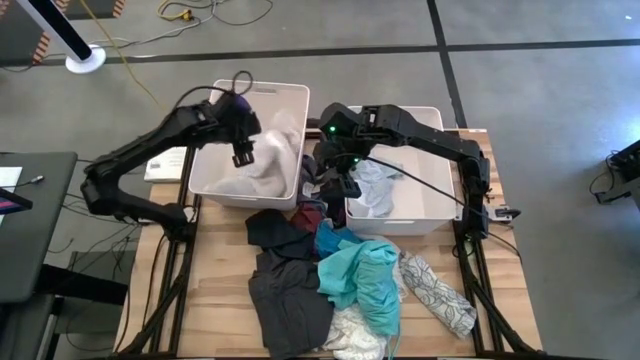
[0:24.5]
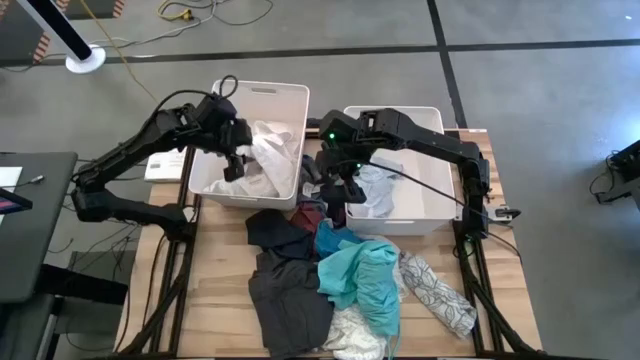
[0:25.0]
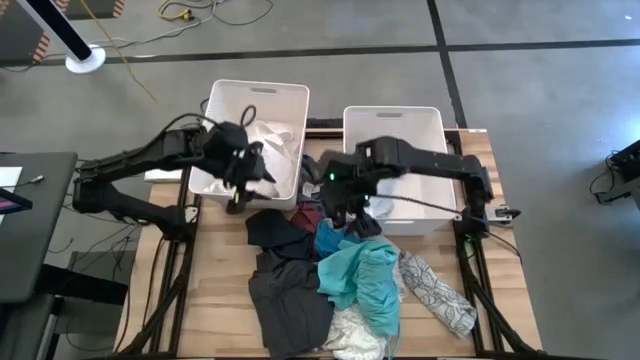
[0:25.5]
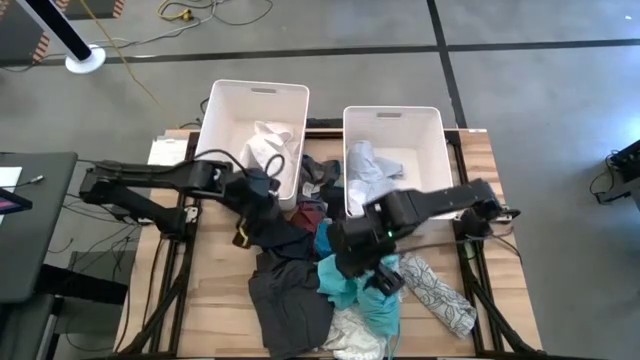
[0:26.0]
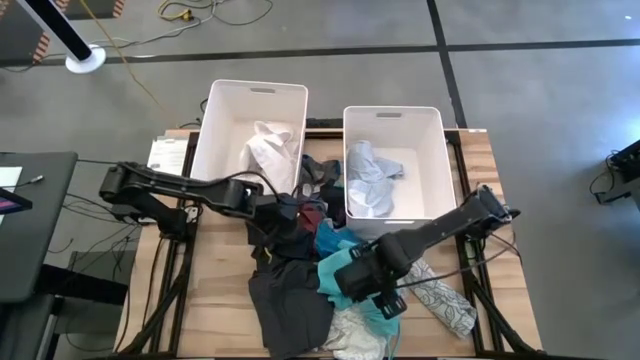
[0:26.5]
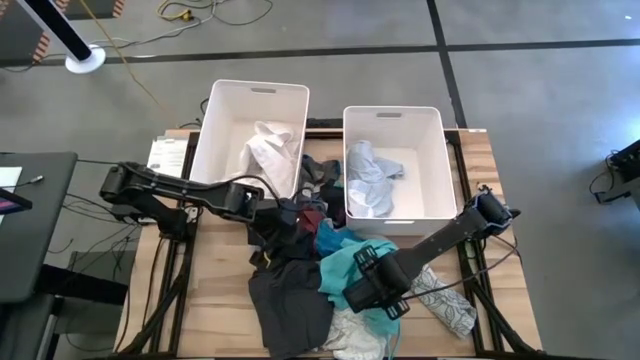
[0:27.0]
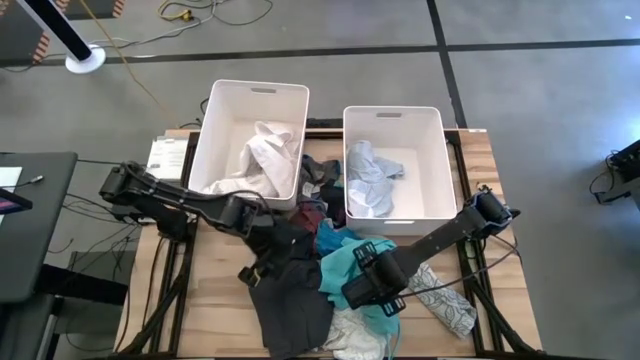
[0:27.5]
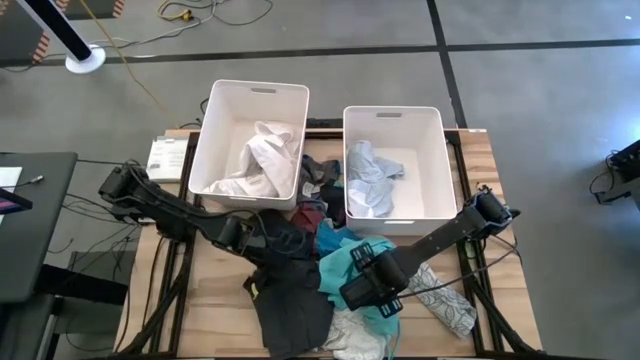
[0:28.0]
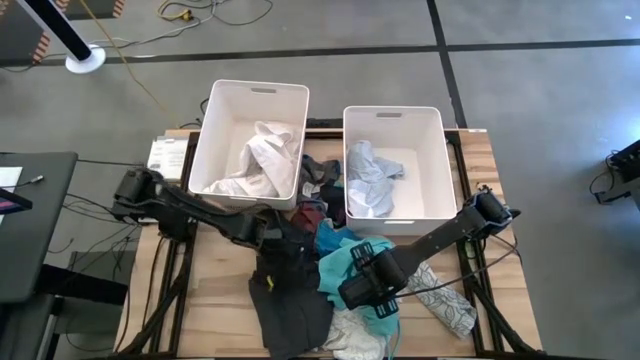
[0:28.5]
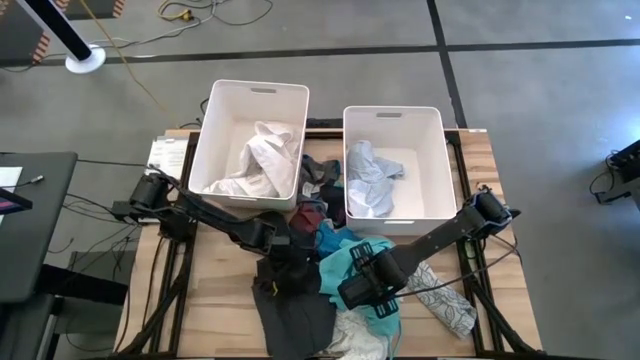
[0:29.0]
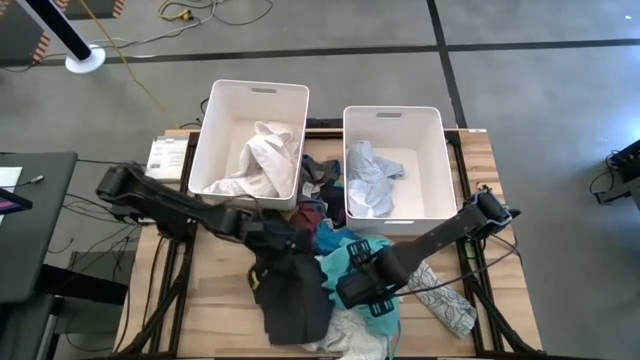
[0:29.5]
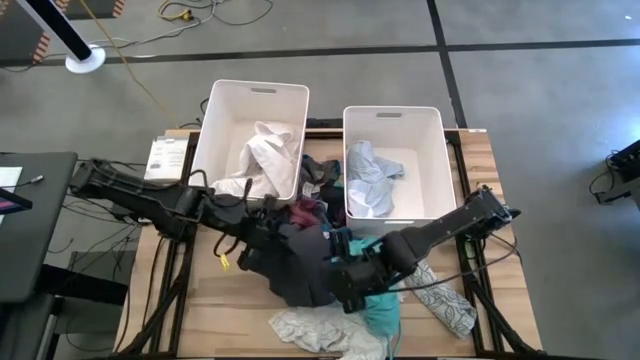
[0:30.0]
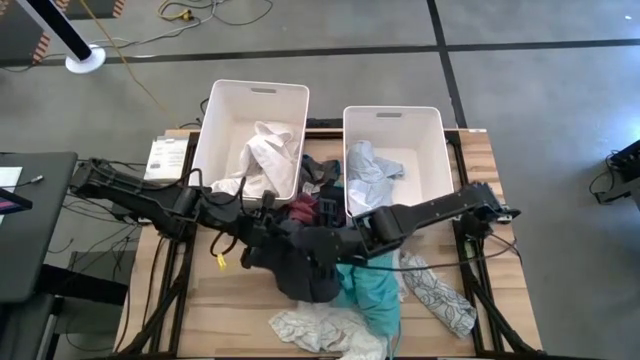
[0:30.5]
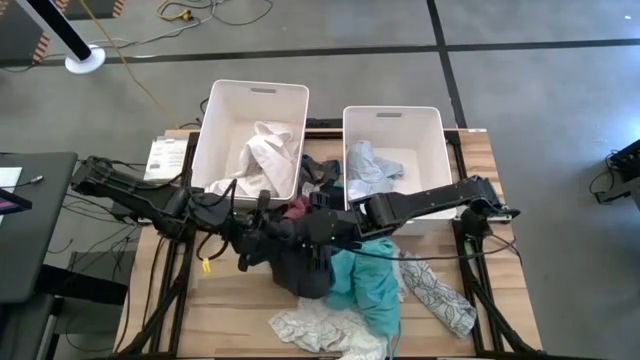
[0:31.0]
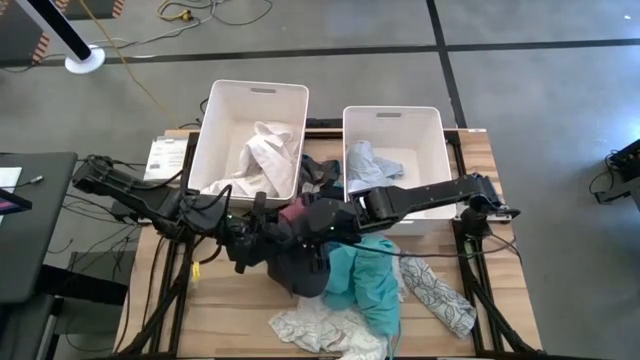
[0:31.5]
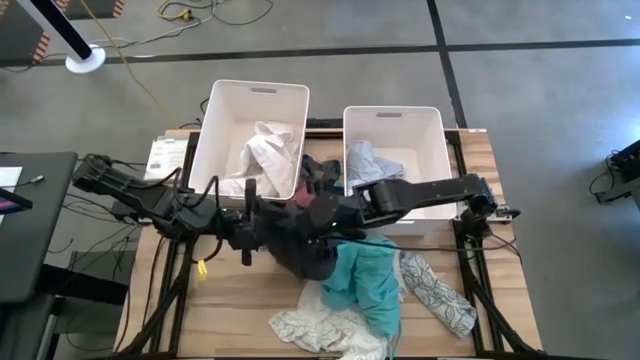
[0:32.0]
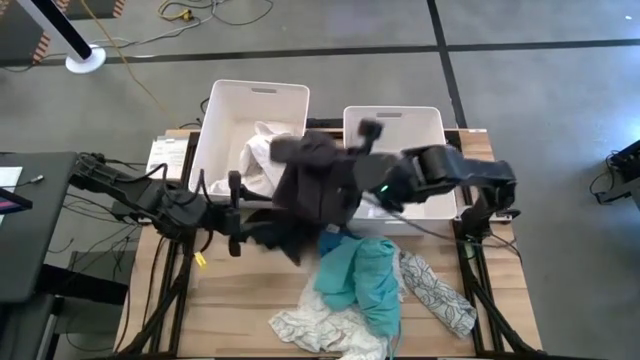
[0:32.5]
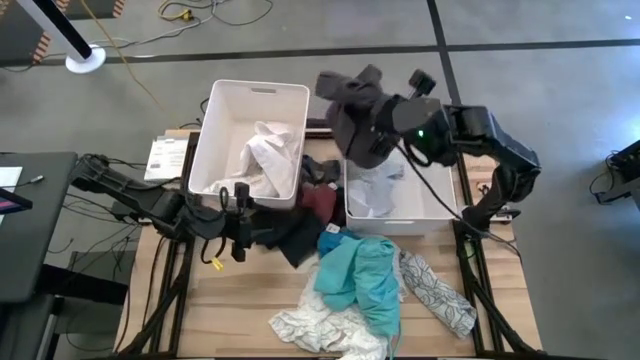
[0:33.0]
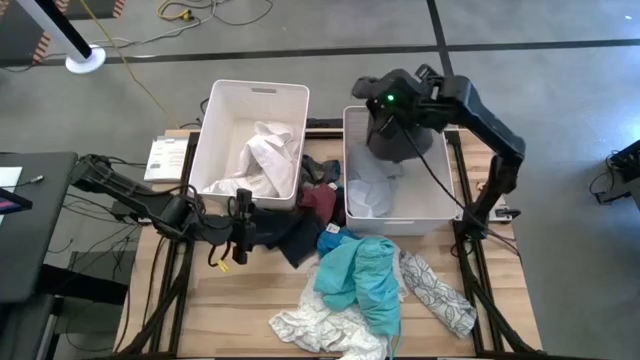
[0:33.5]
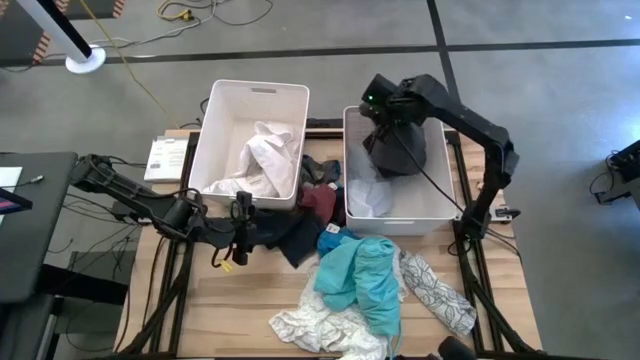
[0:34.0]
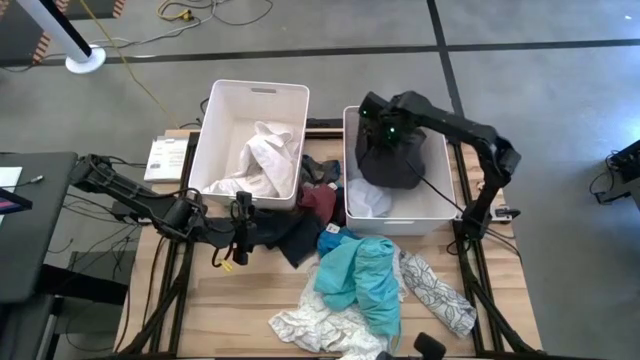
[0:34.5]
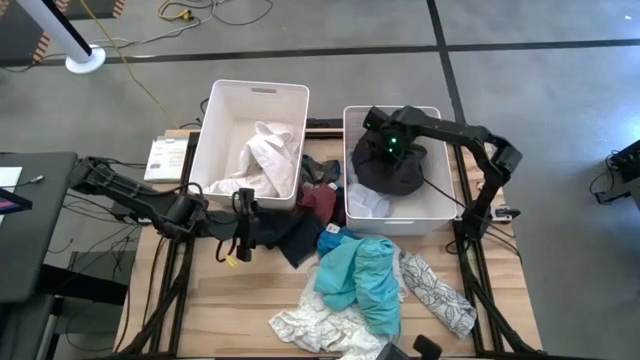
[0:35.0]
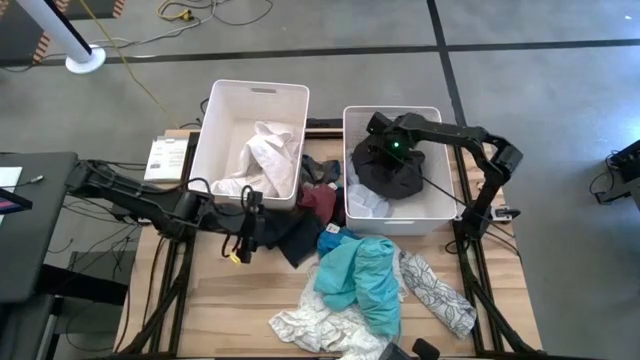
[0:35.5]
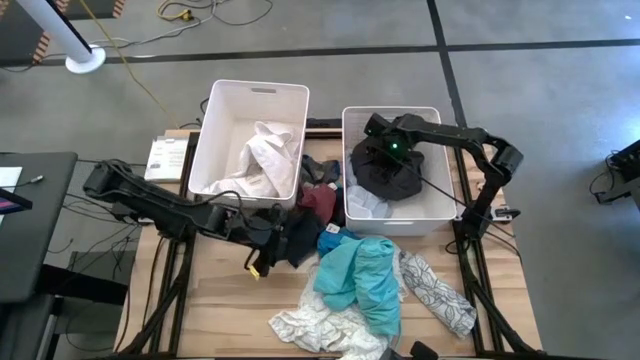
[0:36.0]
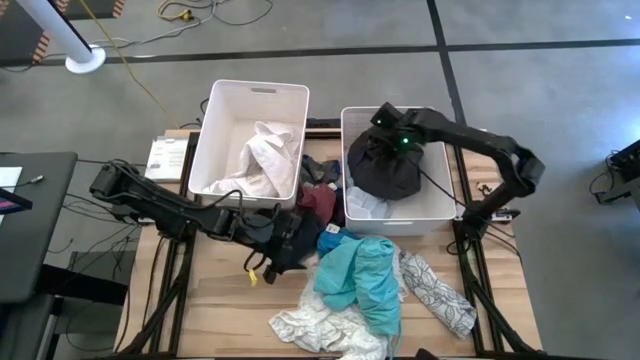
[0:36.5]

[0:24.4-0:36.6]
Task: Sort clothes
Put the black pants into the right white laundry bin

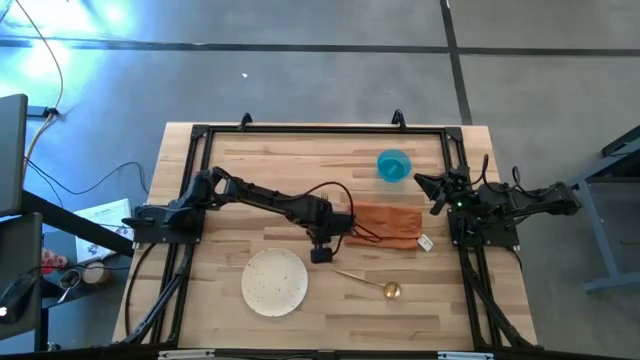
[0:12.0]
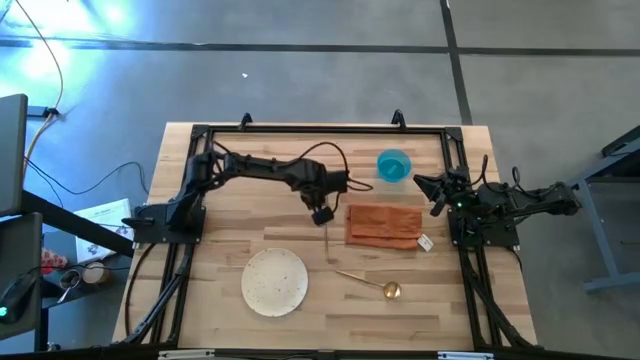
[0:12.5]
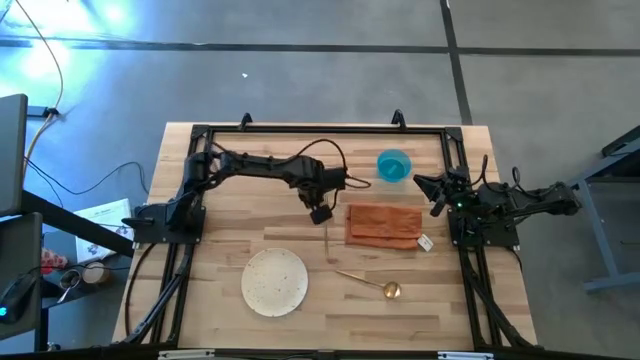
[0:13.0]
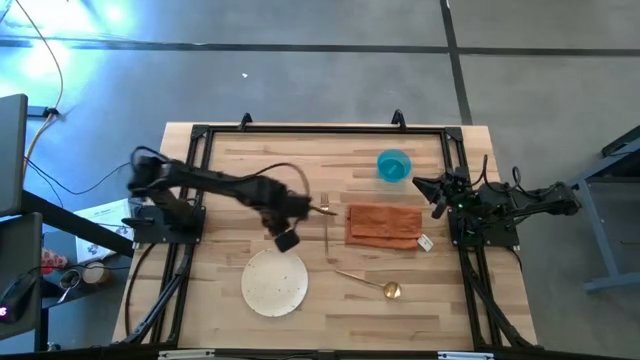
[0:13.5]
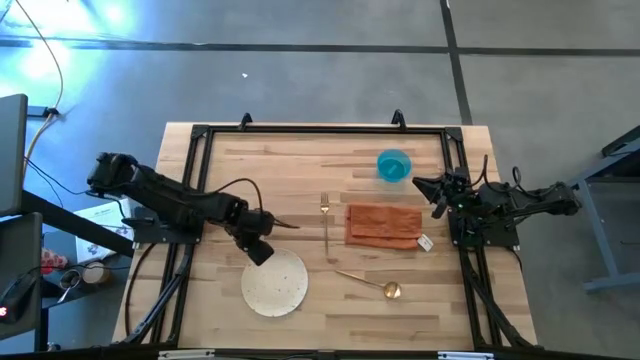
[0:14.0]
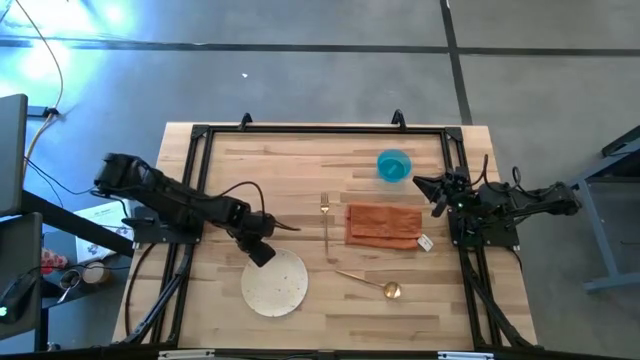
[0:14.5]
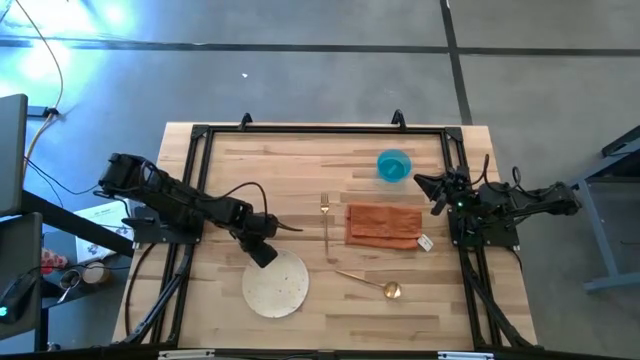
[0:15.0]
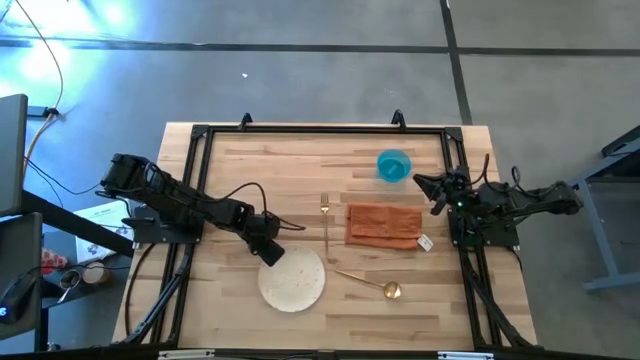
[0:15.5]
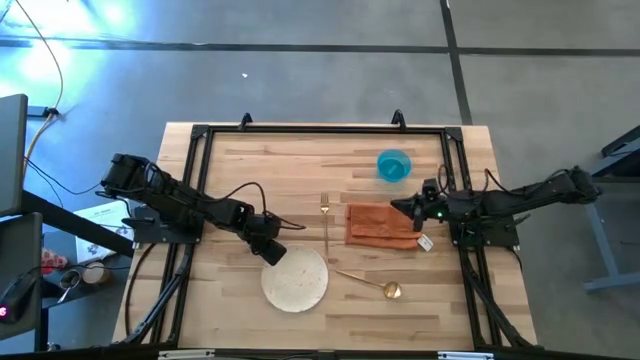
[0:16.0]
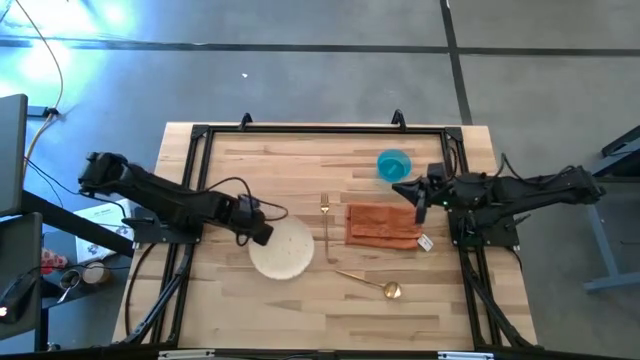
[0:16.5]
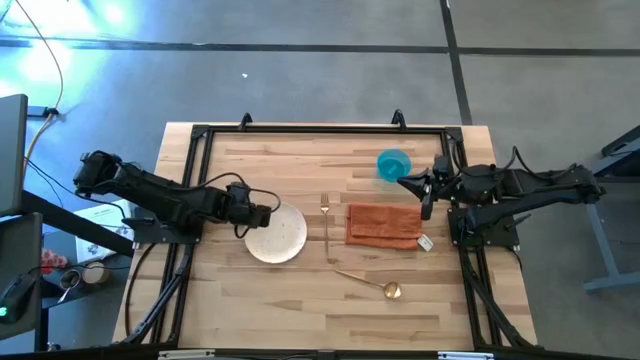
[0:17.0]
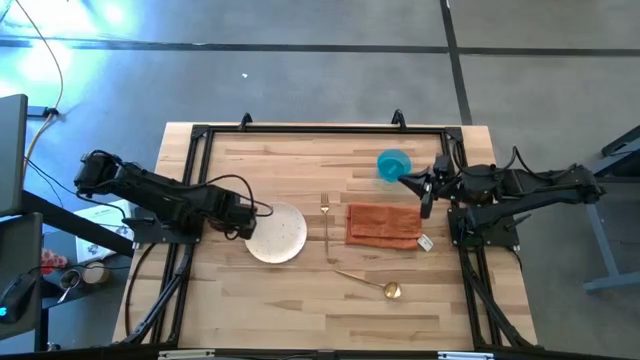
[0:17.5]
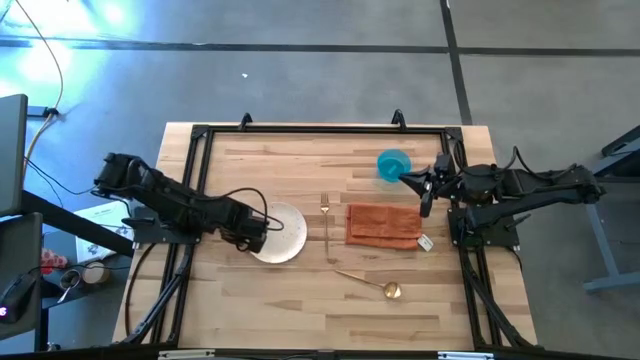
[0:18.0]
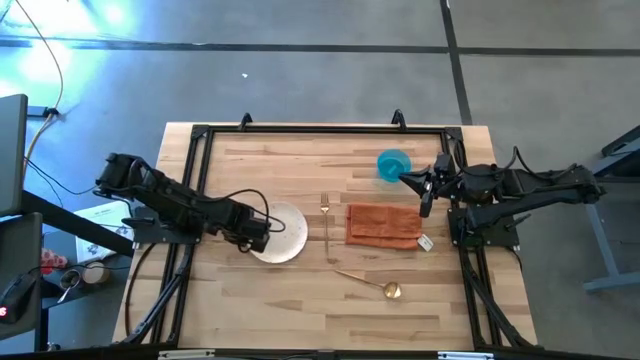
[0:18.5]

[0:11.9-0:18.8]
Task: Set table place
Move the white plate to the left of the gold fork
